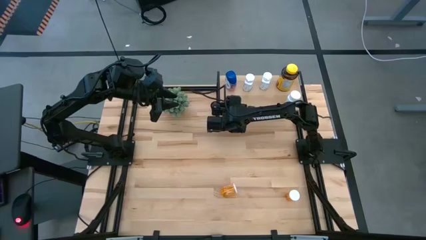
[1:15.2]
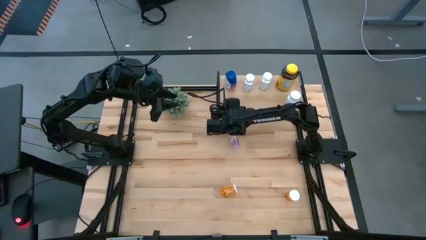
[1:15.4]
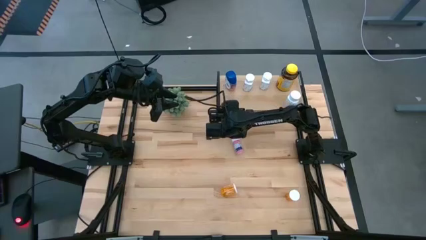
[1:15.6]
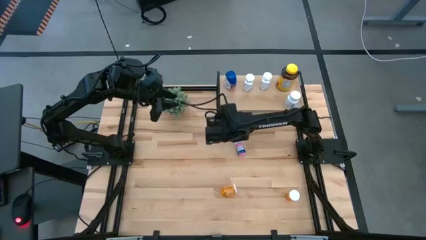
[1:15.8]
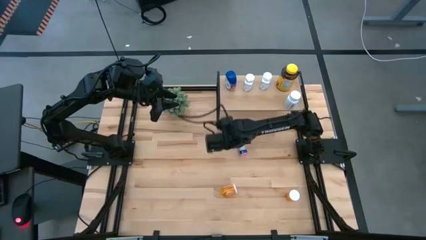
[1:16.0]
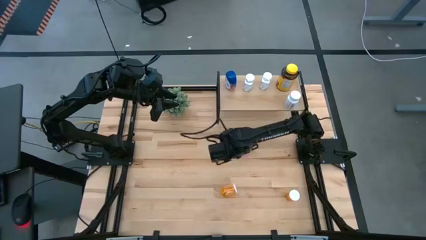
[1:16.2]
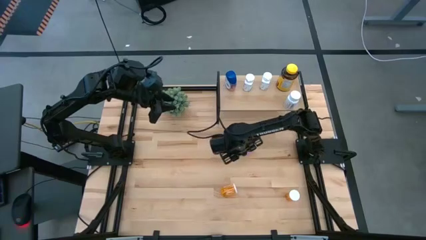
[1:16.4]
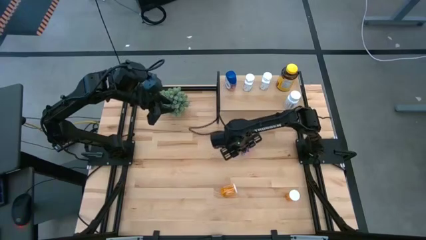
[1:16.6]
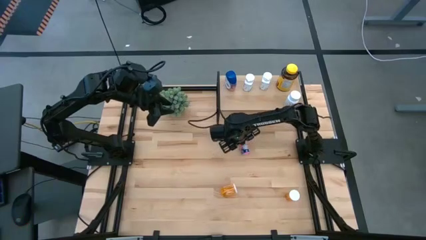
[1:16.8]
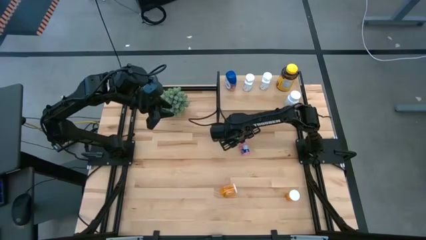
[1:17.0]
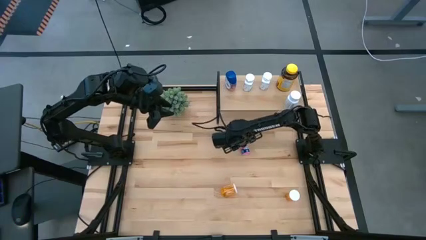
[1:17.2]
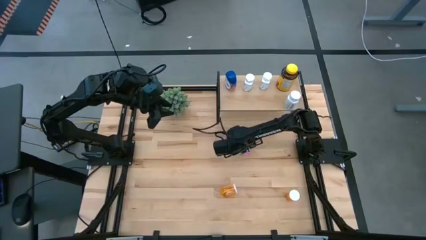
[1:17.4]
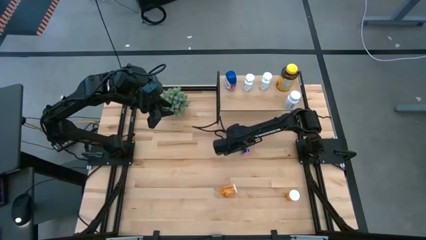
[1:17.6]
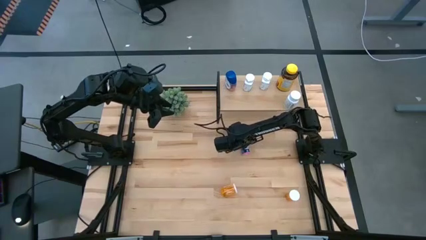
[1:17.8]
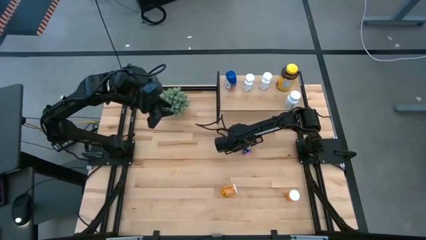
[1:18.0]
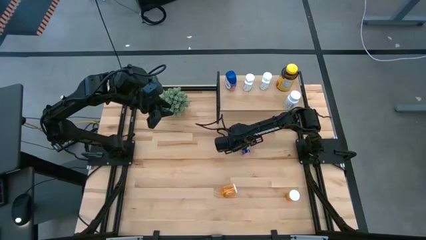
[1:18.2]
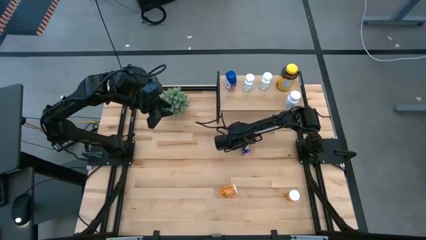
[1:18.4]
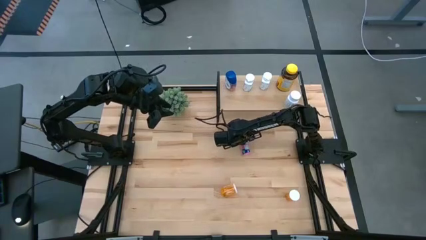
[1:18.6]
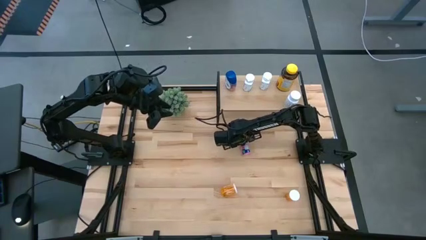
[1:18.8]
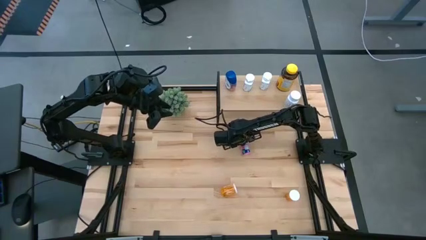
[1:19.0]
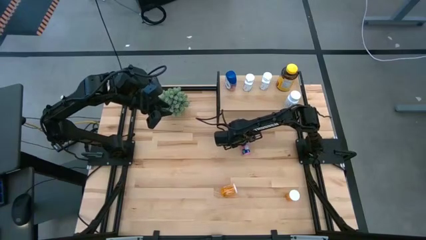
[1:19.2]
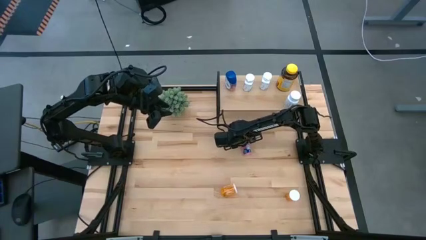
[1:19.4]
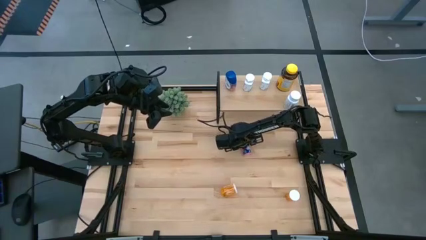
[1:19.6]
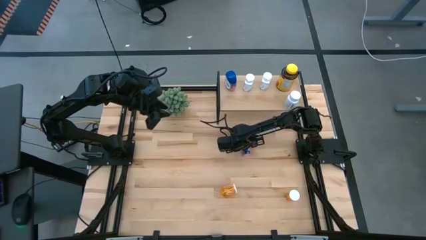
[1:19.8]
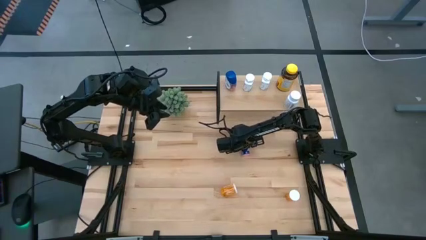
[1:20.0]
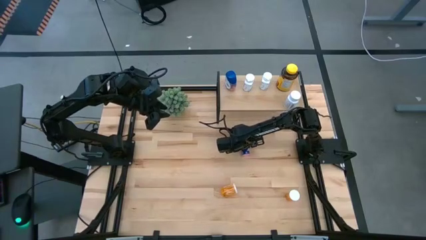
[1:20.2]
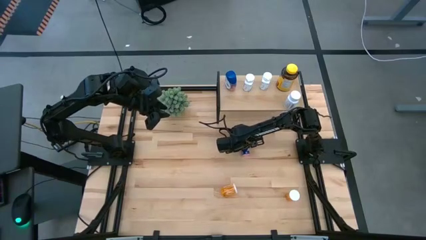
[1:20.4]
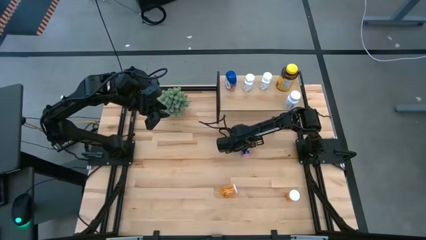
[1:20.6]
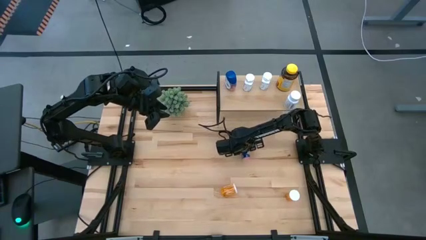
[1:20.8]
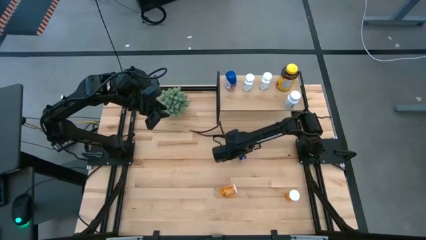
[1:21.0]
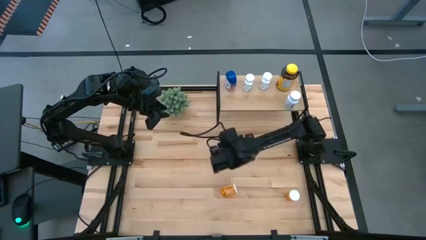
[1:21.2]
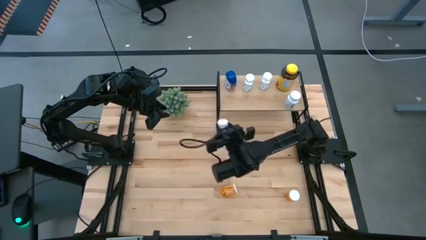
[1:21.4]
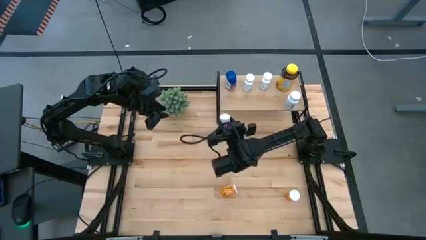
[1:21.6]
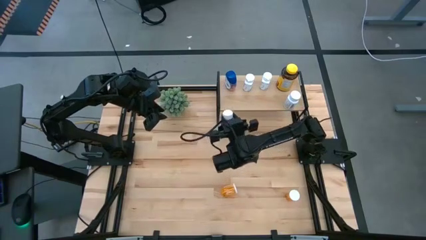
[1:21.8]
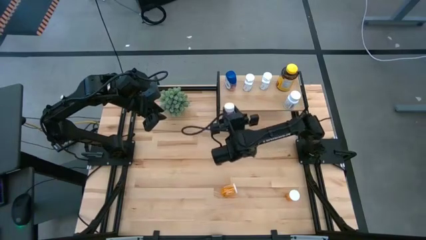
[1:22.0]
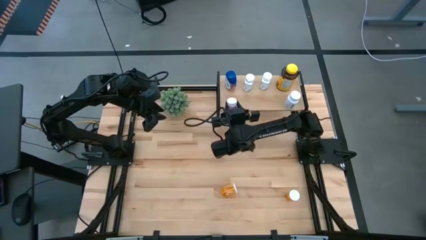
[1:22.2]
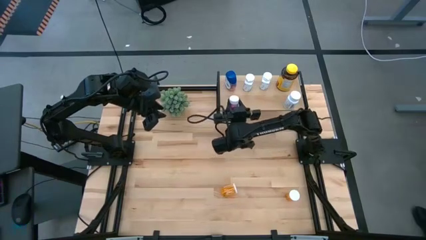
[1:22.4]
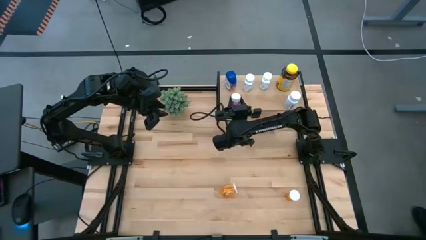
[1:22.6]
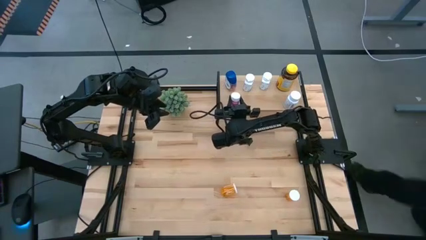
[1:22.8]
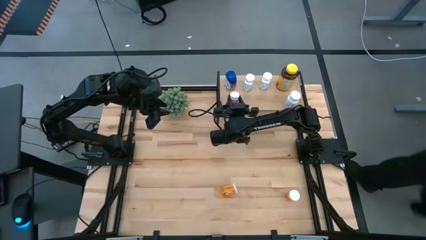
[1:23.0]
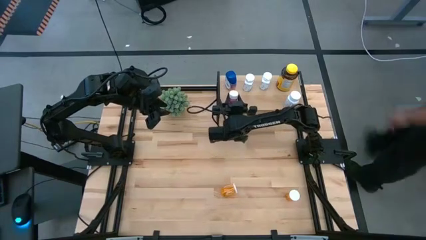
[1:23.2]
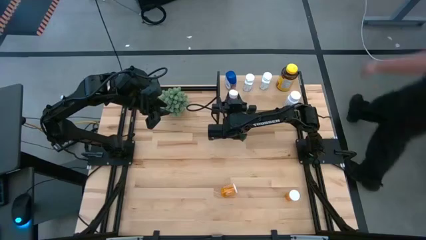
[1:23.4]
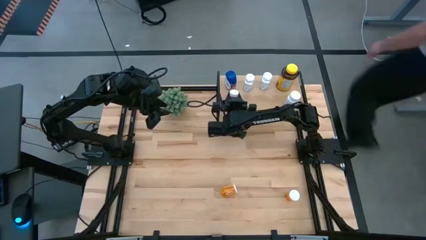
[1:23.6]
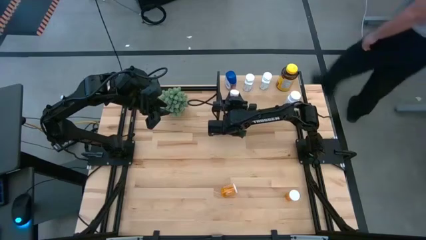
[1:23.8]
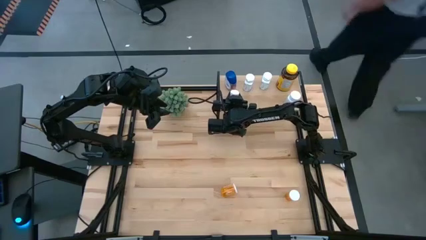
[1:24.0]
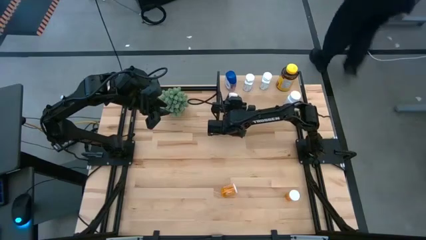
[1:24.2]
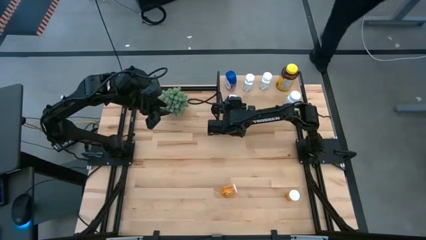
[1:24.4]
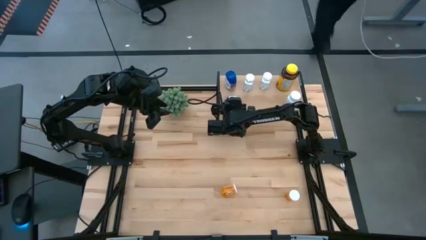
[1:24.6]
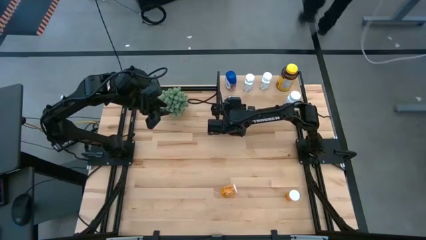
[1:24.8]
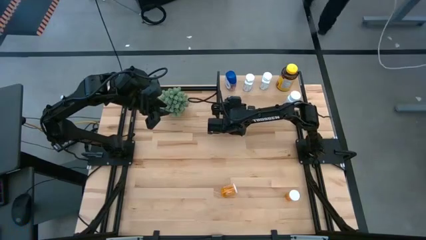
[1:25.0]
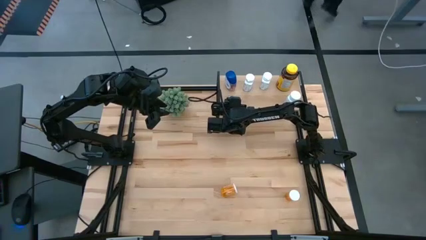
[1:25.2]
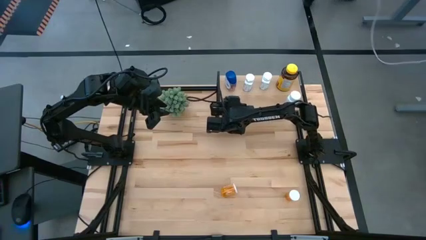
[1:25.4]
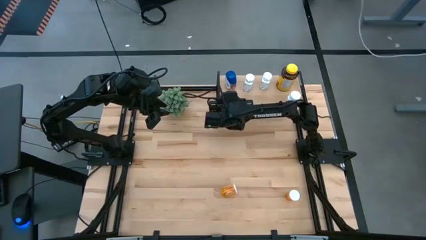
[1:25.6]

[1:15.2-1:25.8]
Task: Pick and place medicine bottles onto shelf by color
Put the pink medicine bottle on the shelf

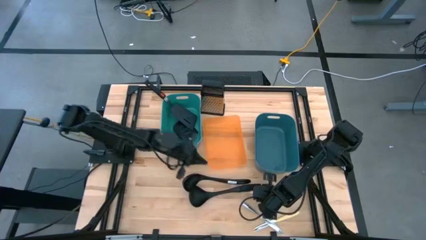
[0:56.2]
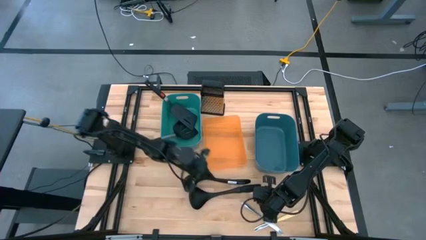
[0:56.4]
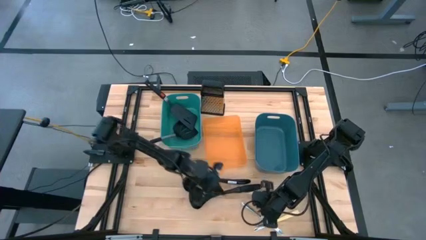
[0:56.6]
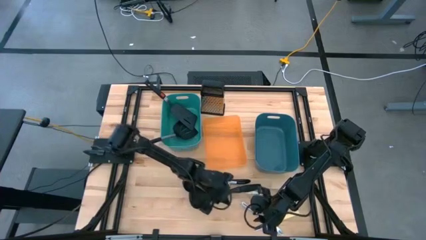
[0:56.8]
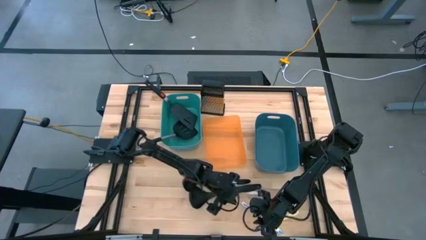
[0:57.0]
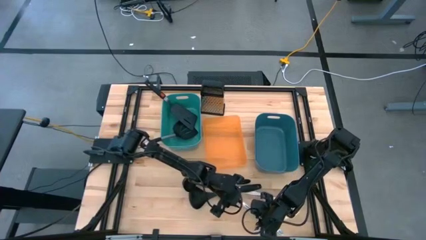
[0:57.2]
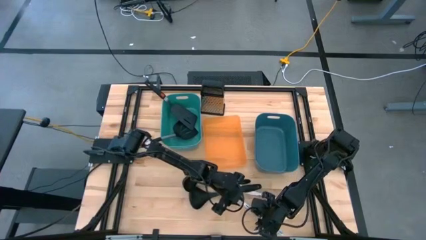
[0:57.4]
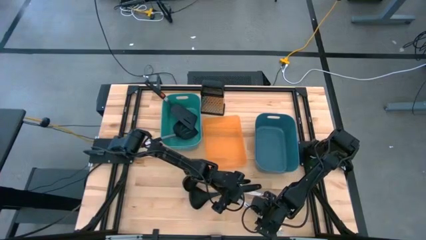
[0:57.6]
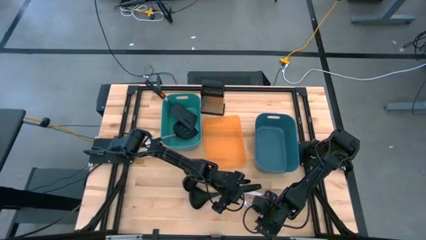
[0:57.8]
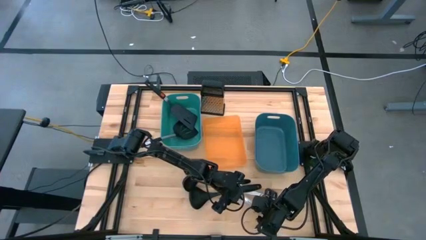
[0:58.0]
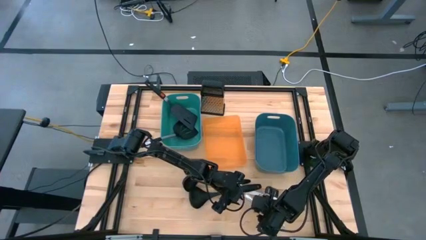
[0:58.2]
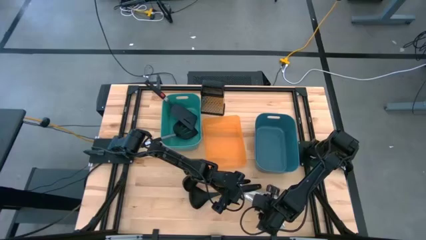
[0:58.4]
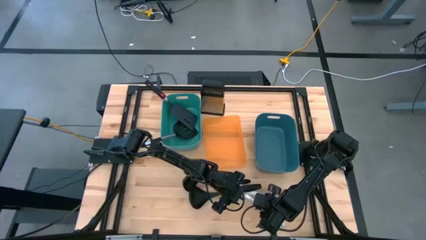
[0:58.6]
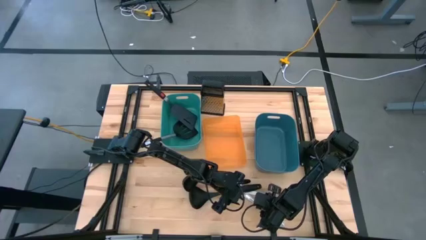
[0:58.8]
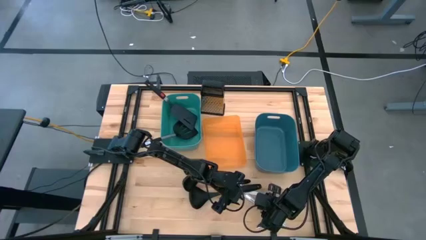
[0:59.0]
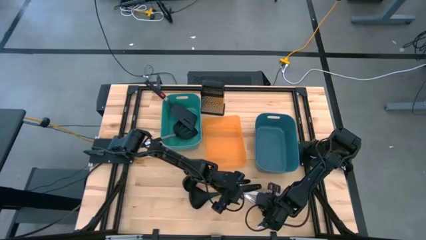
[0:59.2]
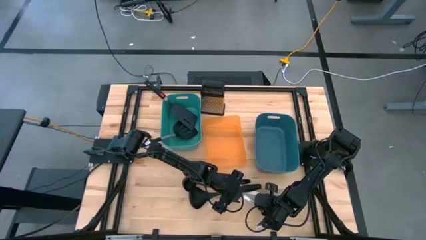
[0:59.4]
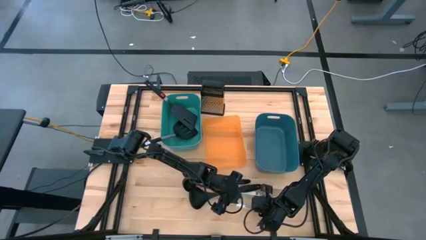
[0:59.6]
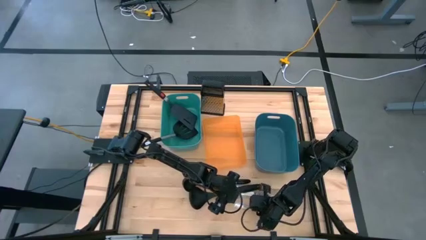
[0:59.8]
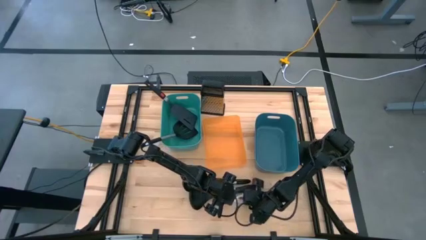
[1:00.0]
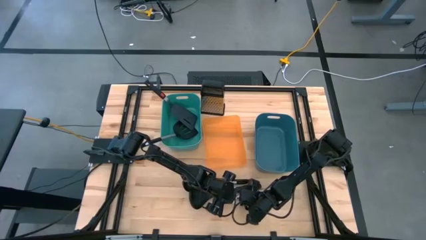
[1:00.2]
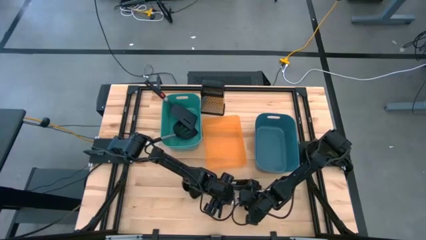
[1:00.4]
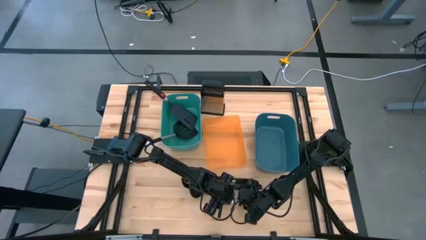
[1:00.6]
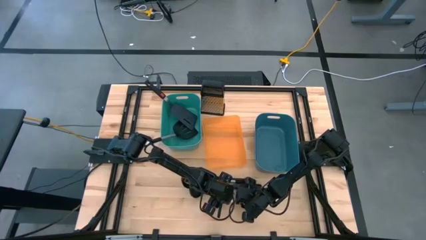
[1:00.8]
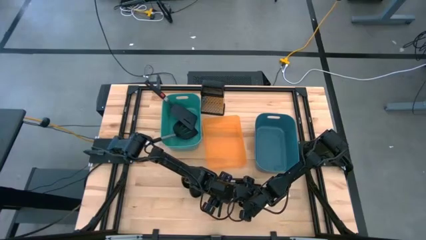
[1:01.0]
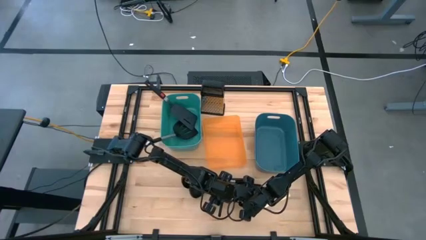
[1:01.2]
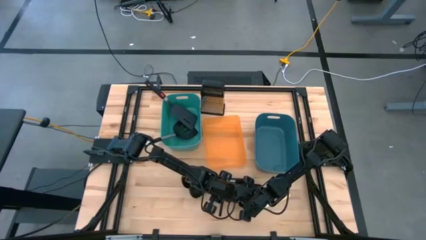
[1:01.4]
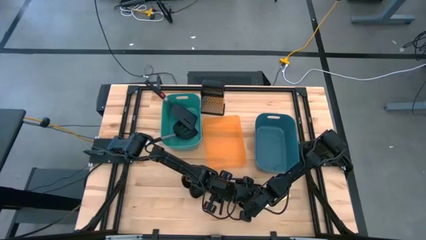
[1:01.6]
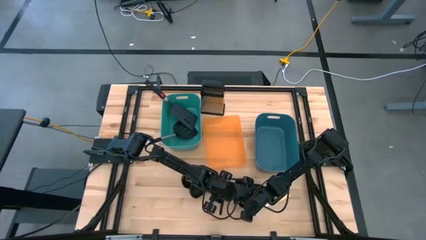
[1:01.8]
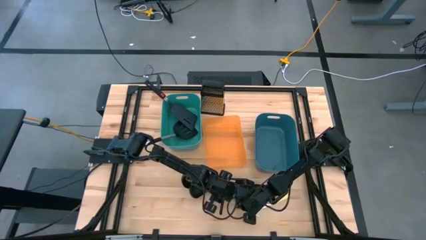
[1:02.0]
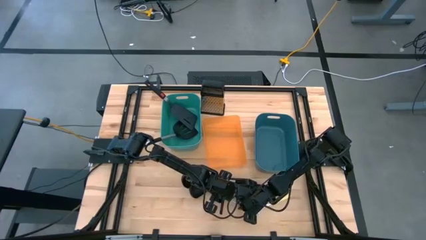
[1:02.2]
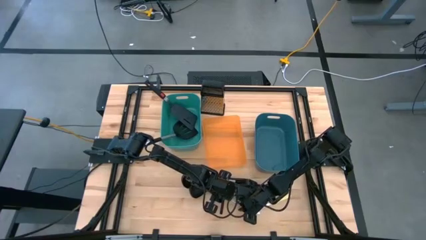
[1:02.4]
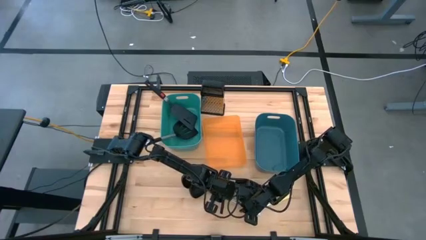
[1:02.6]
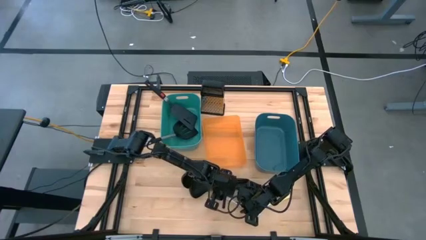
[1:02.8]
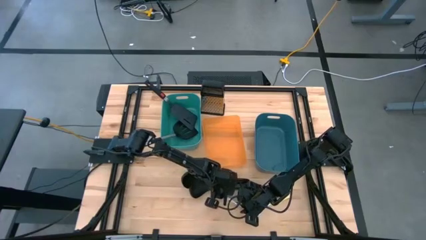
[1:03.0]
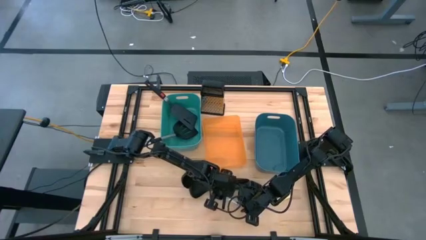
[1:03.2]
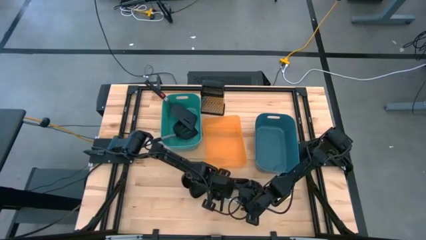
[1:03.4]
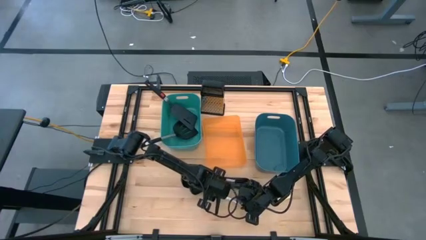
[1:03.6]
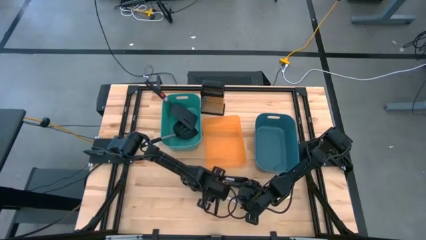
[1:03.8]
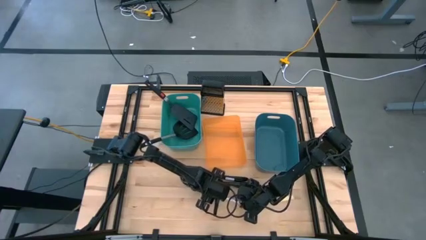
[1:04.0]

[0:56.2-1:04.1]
Task: Pick & Place Kitchen Items
Put the bottom silver table knife into the blue bin
